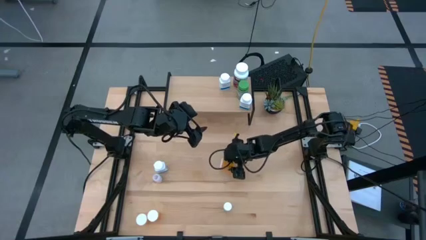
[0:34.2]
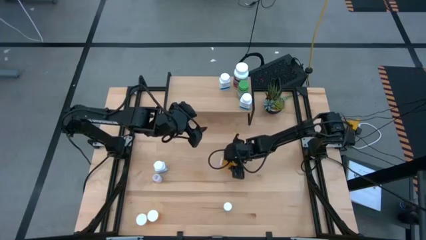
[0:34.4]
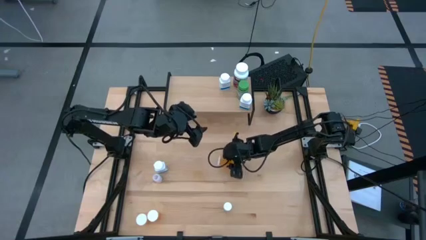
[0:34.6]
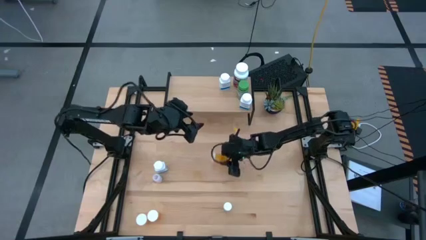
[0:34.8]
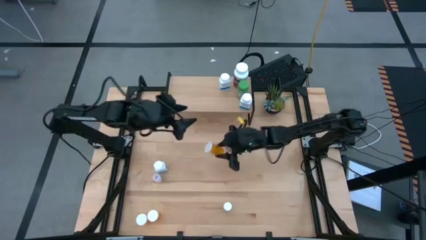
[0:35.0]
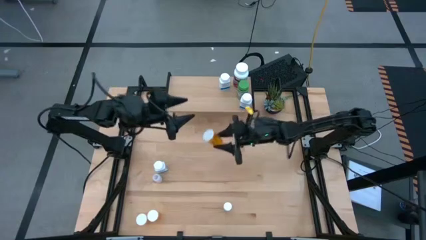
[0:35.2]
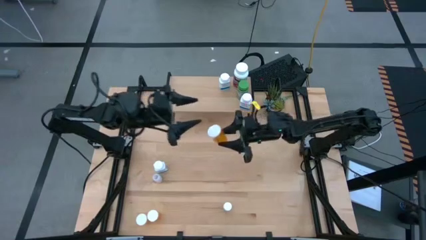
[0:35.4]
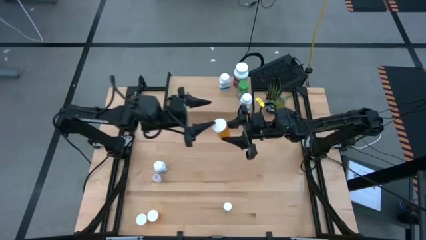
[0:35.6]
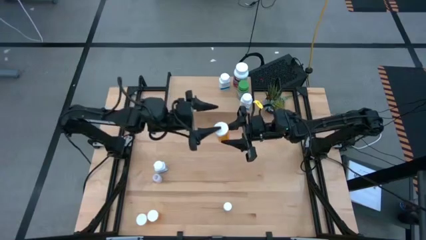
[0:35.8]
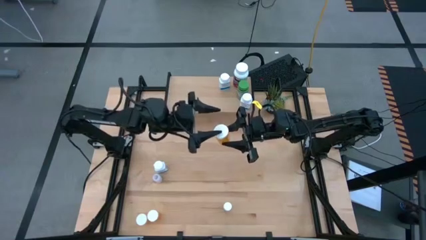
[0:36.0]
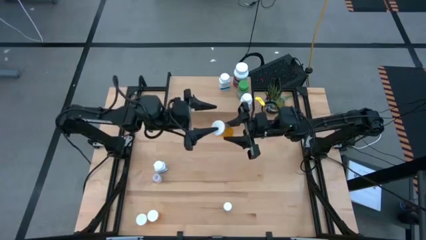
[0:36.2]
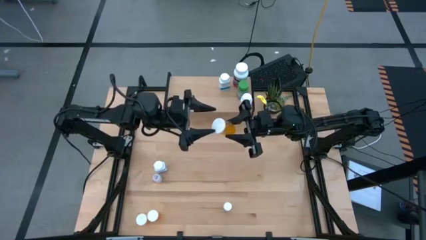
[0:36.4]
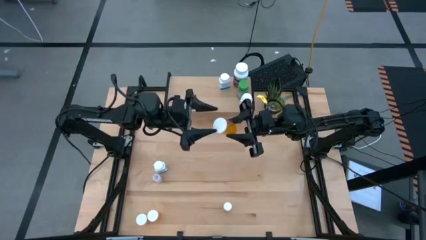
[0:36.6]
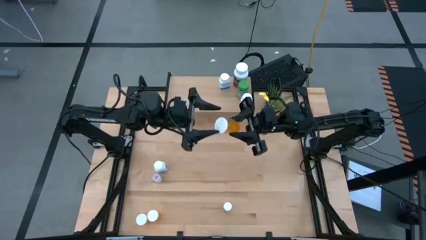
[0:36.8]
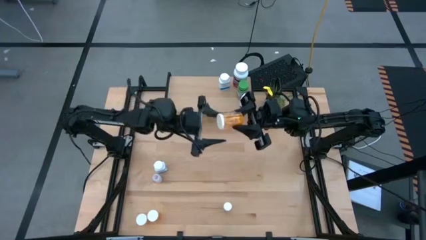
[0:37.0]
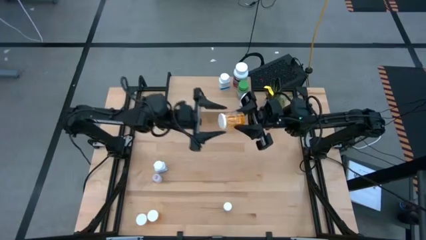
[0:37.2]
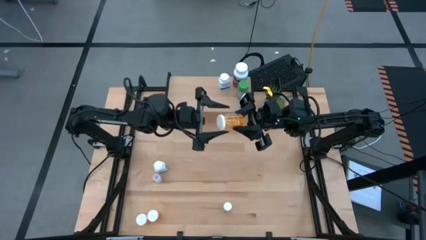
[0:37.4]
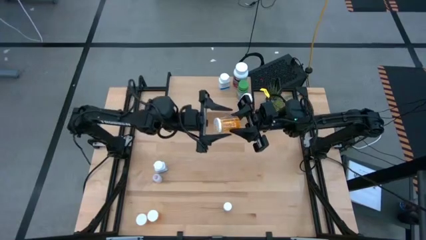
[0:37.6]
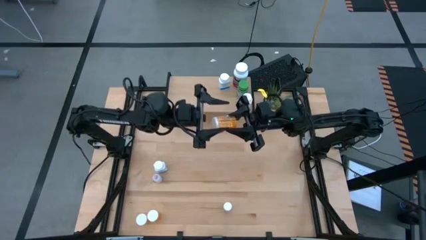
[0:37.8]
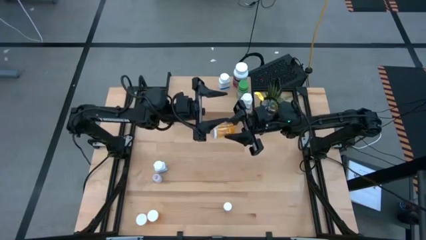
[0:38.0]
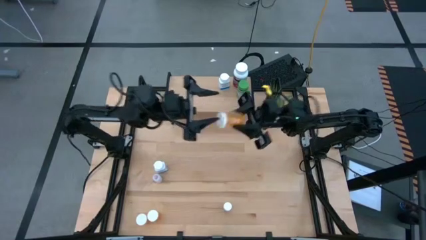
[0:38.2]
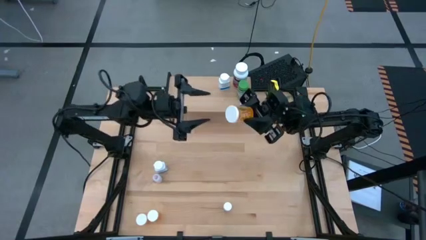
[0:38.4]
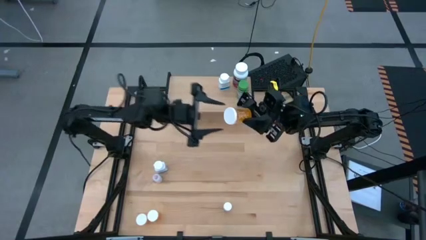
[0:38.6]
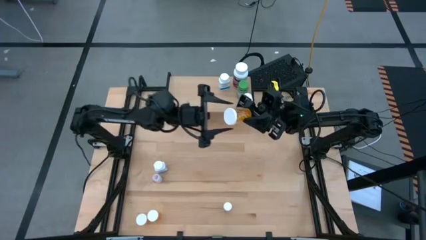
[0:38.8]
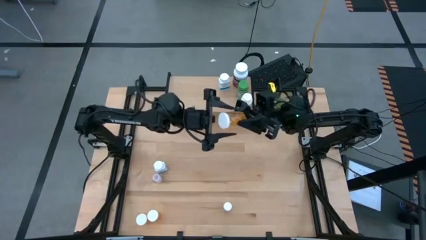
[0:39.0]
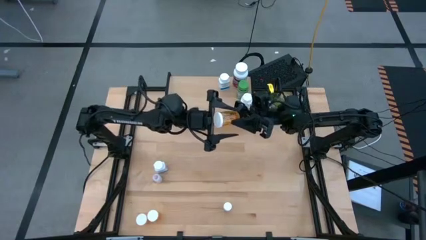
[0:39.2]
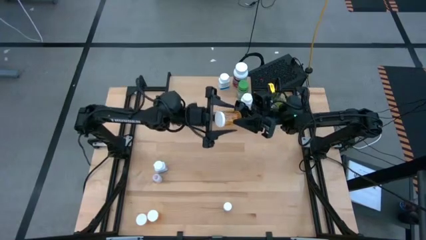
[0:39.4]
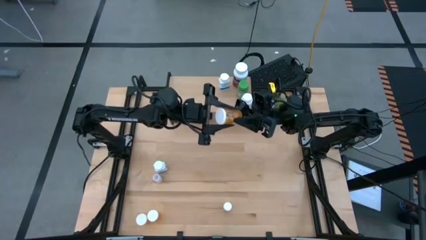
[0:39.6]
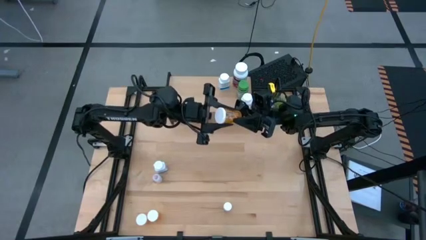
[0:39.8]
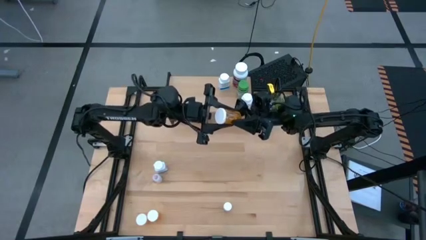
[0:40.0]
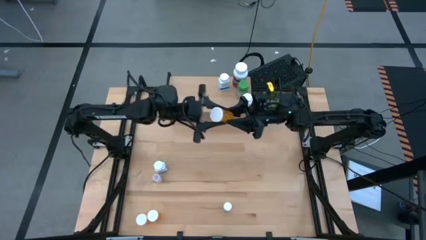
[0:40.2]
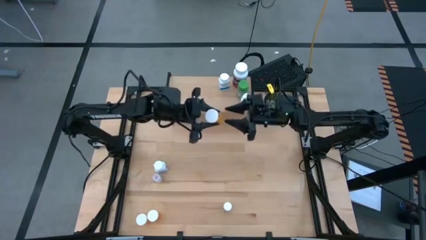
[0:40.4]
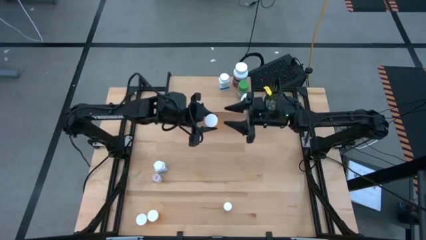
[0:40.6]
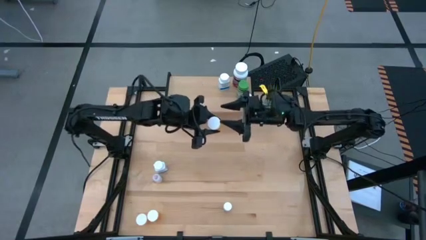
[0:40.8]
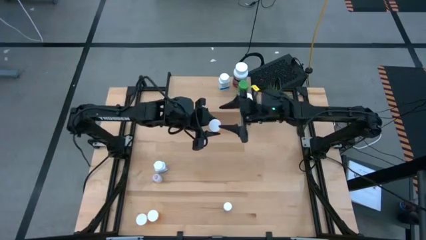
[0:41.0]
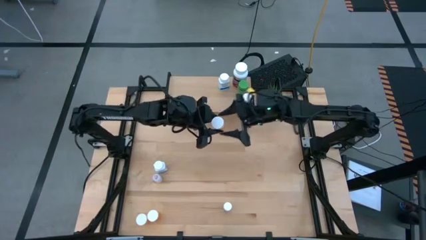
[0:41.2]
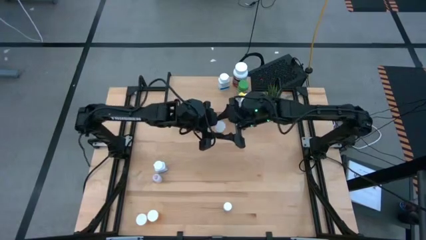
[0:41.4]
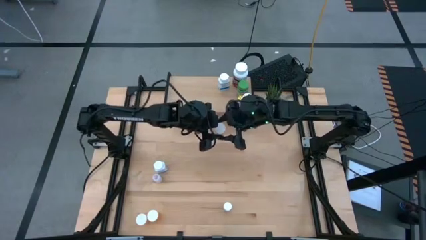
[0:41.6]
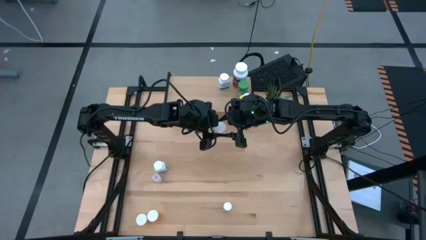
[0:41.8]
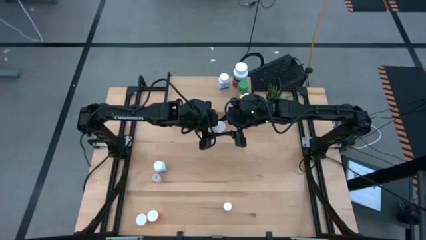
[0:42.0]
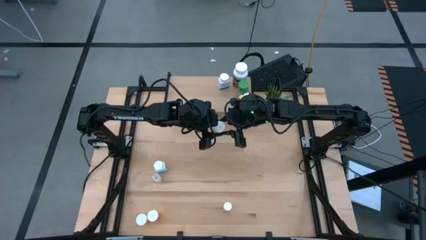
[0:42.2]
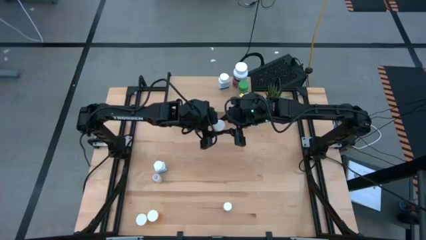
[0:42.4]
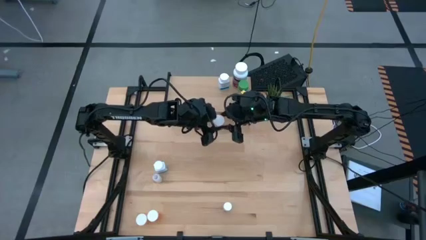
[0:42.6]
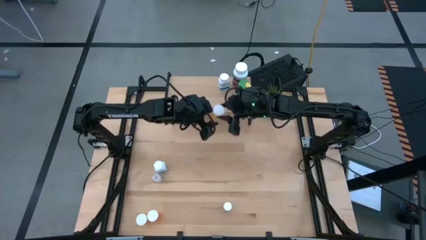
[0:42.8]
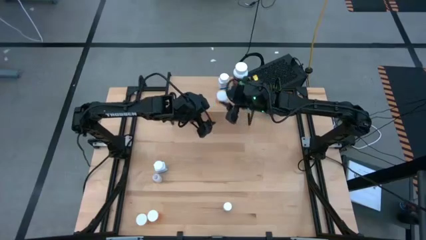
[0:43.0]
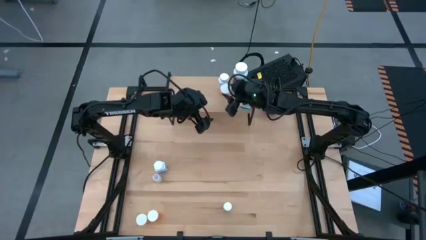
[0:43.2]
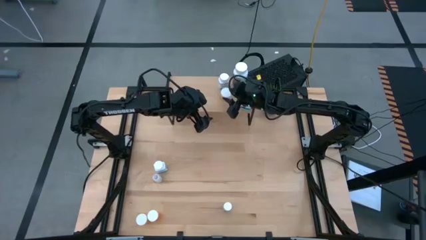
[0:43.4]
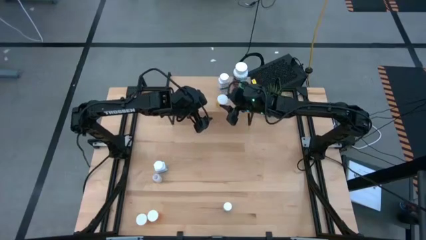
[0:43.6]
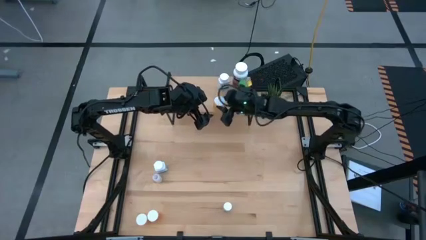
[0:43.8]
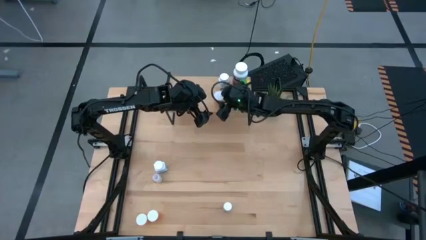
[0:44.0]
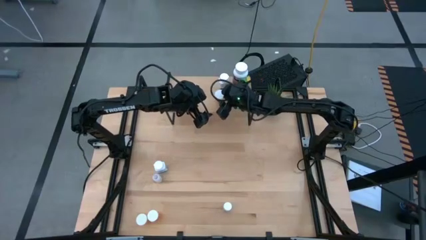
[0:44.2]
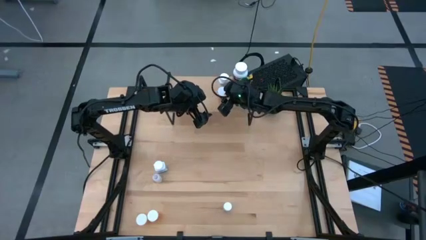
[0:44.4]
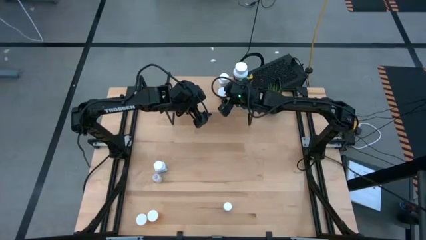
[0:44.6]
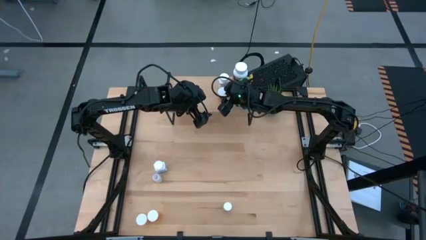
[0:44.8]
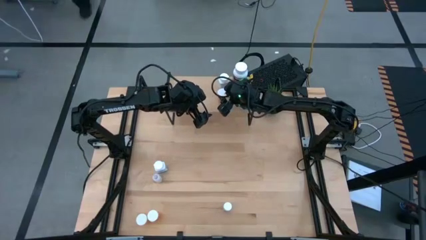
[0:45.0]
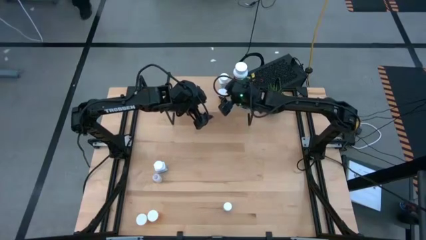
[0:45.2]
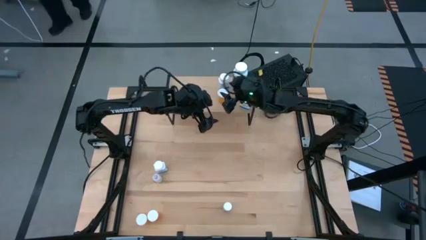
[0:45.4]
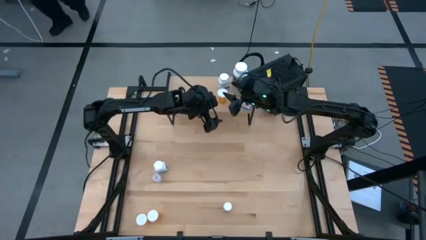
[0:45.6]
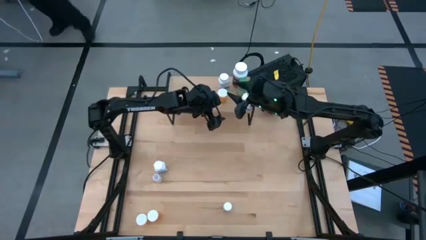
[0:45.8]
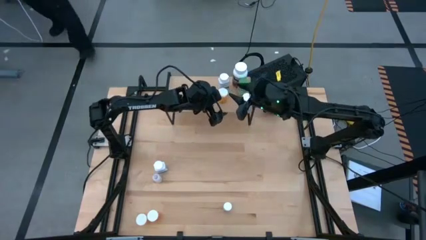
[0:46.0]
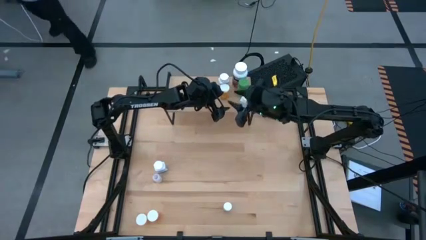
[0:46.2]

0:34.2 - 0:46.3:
Task: Pick and place medicine bottles onto shelf by color
Put the top orange pill bottle on the shelf

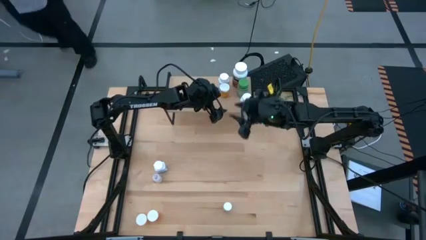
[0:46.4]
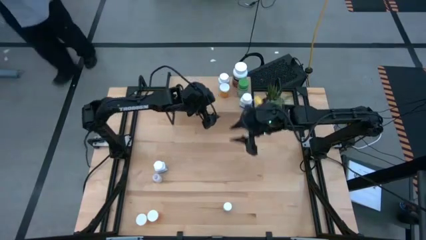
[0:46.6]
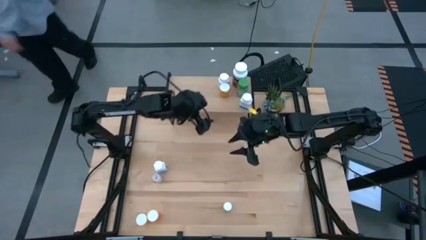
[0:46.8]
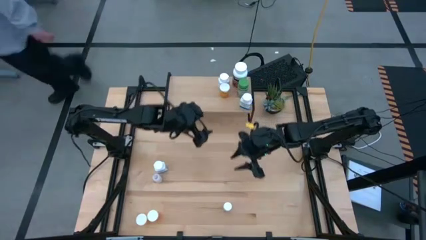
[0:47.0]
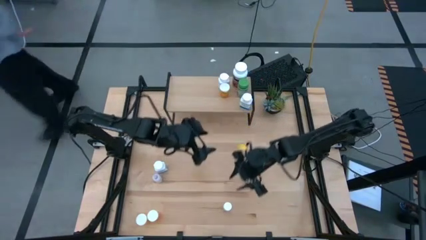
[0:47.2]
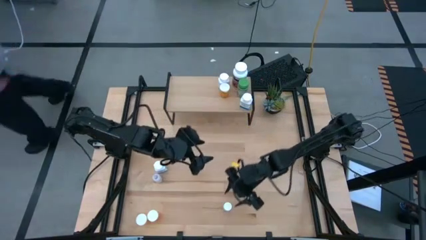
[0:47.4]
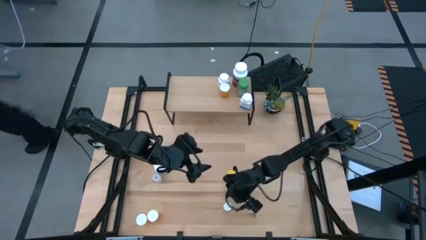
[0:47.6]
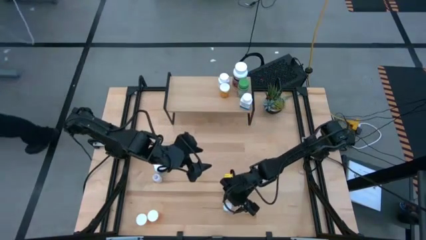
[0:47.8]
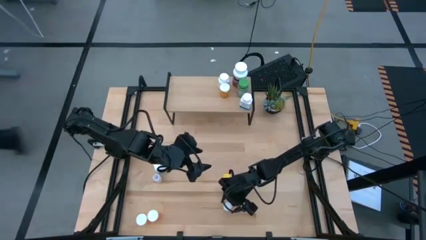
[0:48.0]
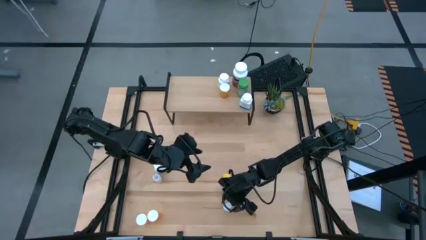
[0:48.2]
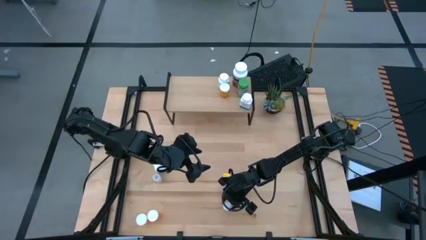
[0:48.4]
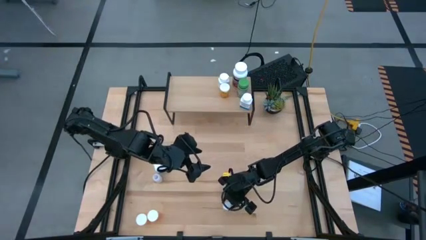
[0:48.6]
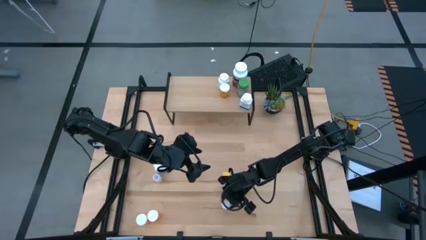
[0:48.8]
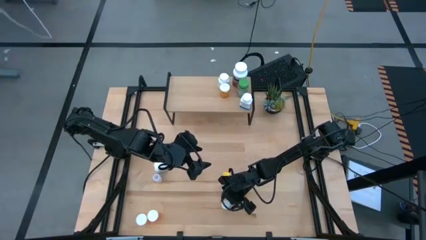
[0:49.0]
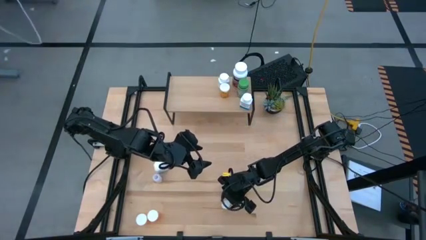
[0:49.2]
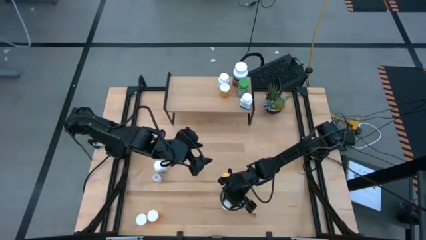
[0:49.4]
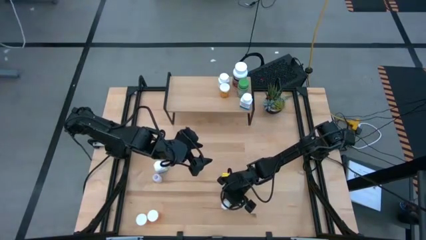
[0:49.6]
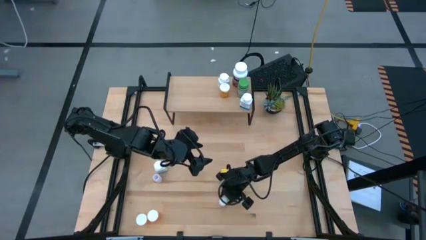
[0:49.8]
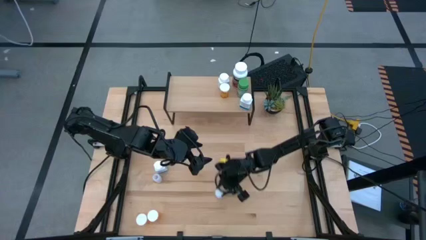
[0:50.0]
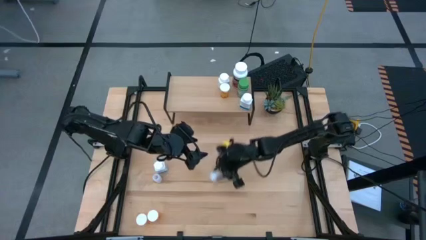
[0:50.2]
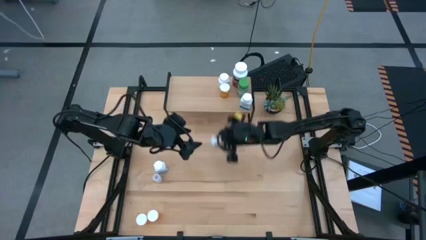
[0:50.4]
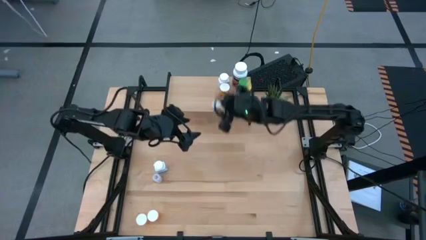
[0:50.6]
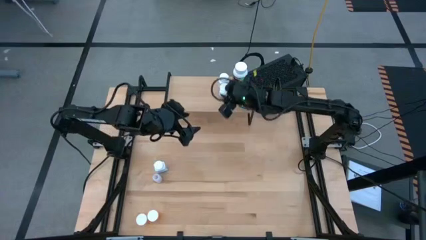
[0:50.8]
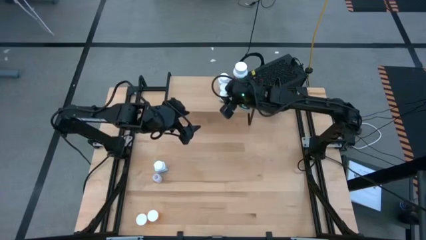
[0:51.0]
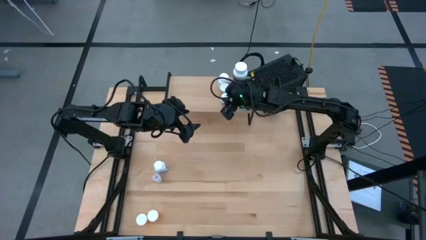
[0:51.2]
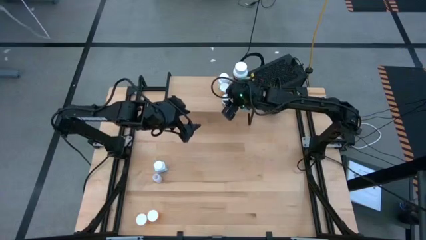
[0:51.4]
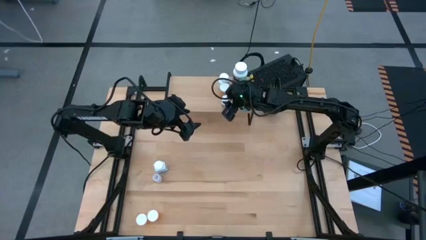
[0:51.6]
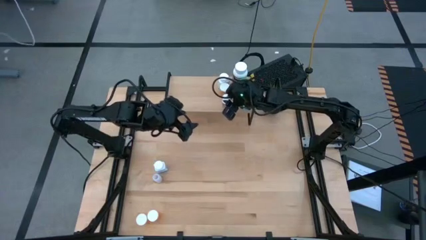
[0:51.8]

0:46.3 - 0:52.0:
Put the small white medicine bottle on the shelf
